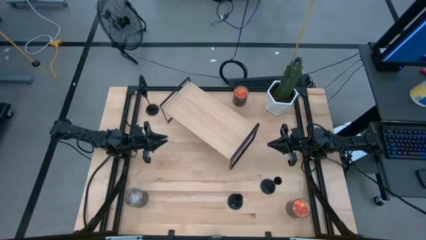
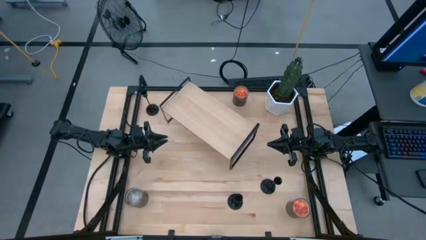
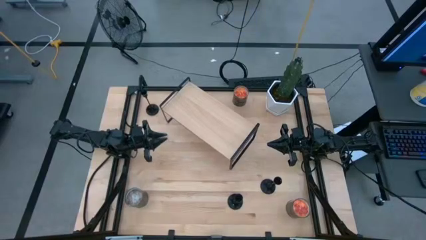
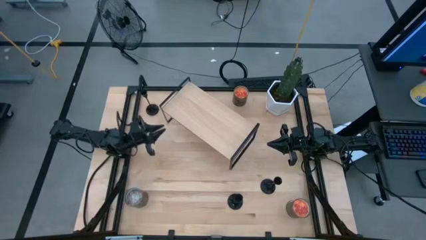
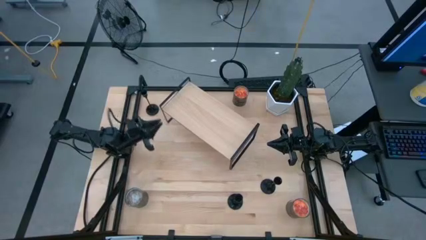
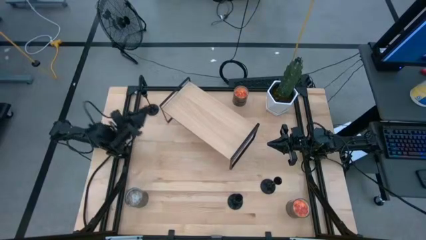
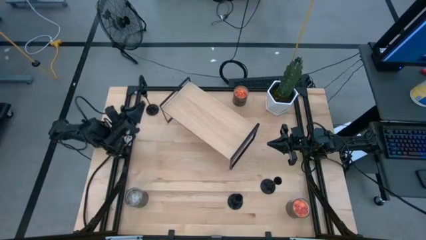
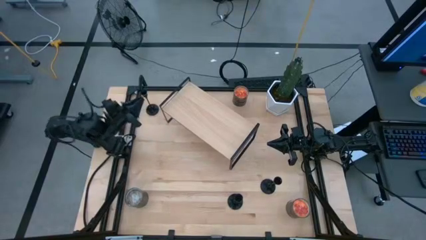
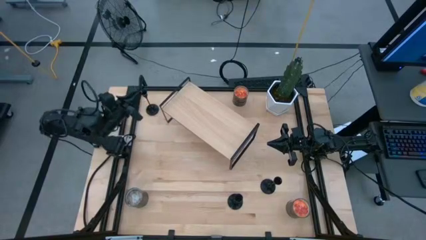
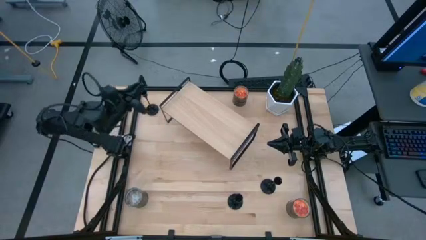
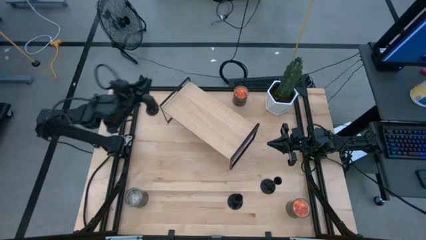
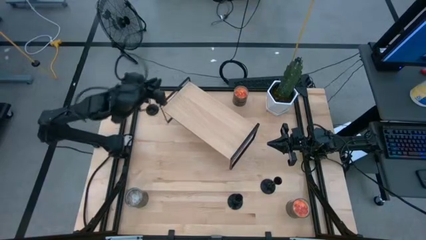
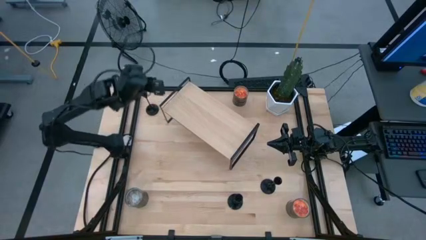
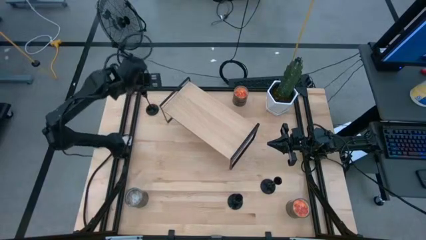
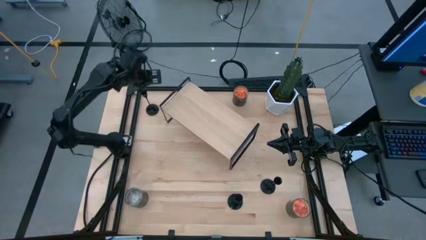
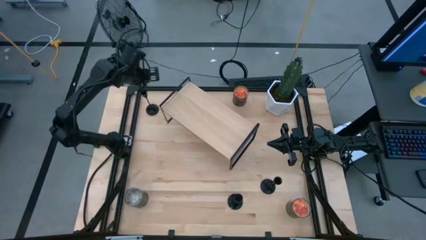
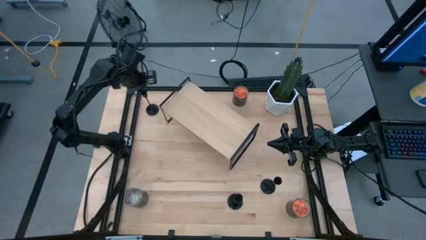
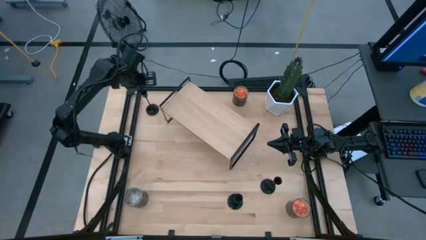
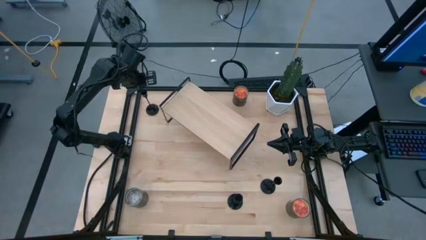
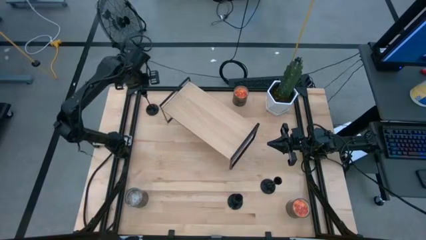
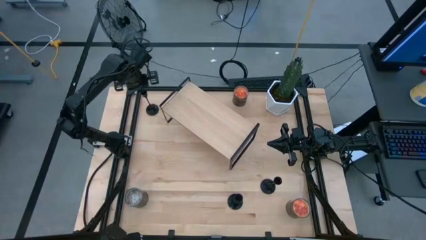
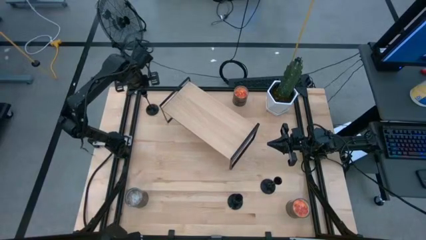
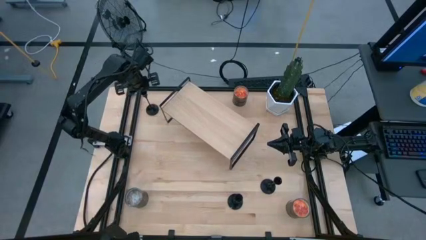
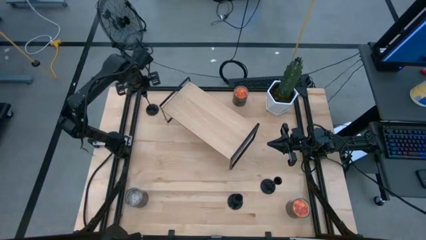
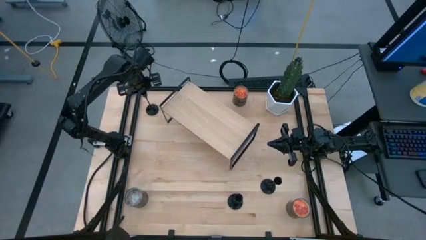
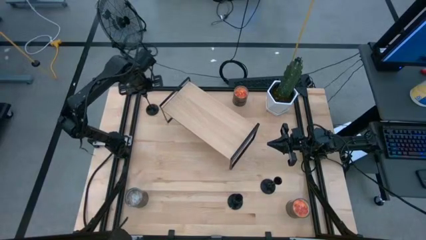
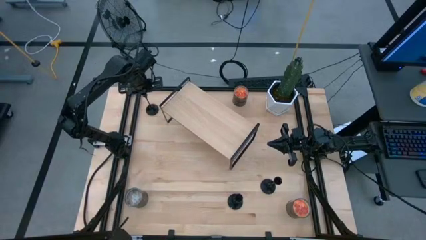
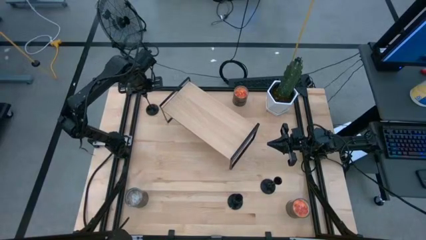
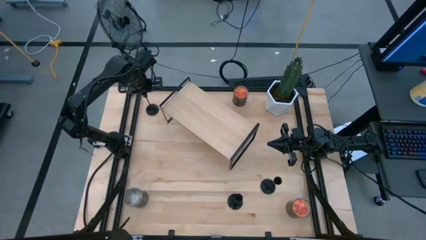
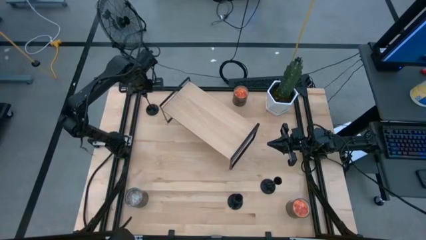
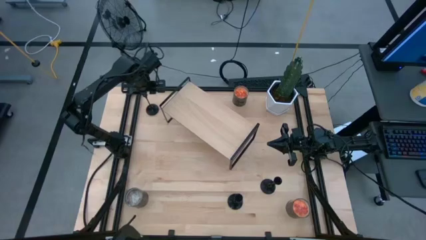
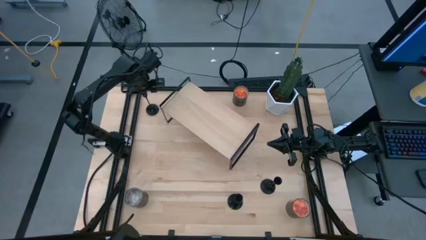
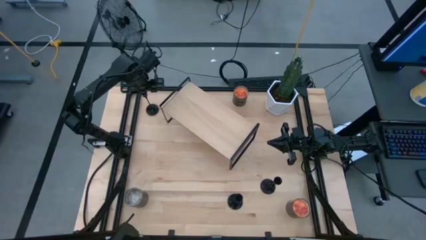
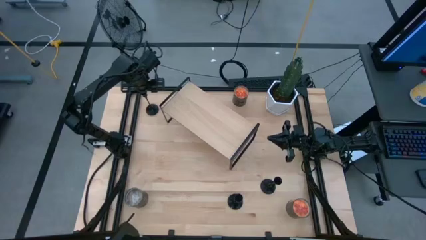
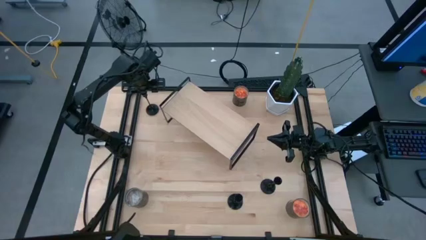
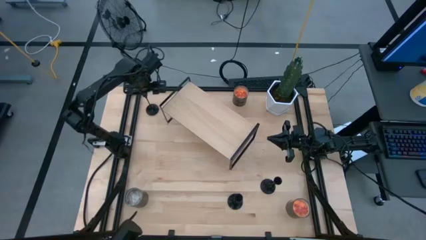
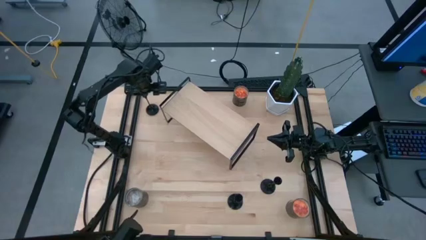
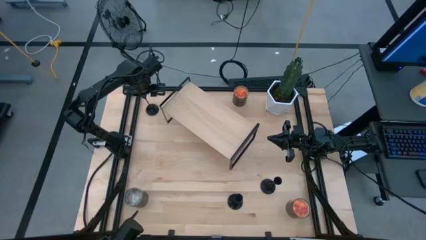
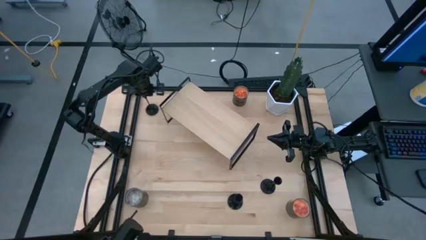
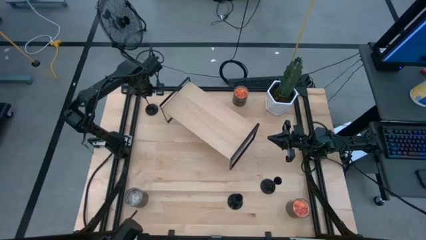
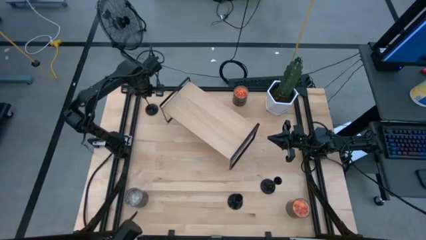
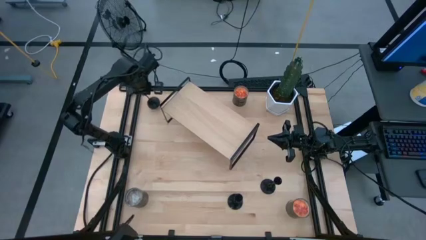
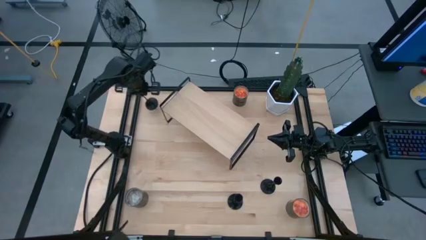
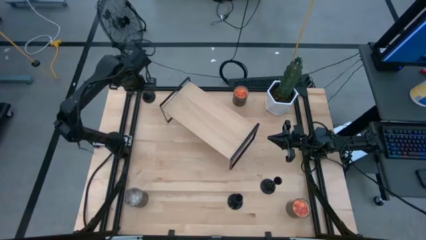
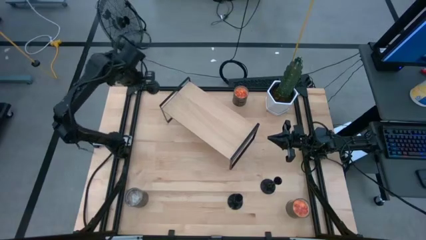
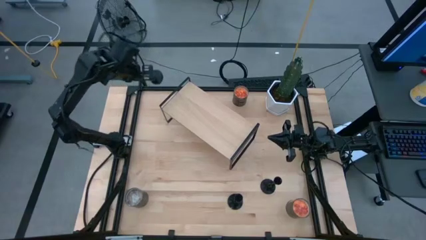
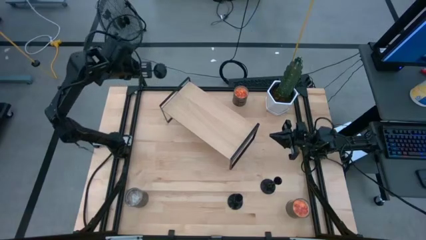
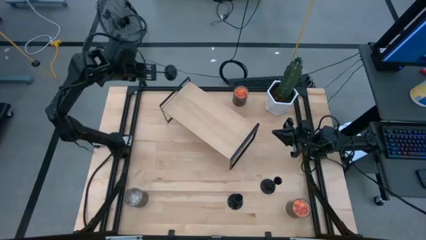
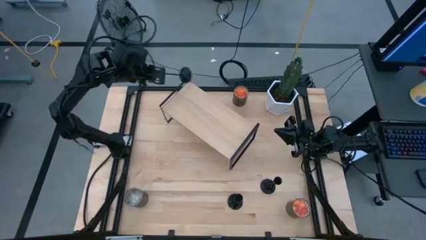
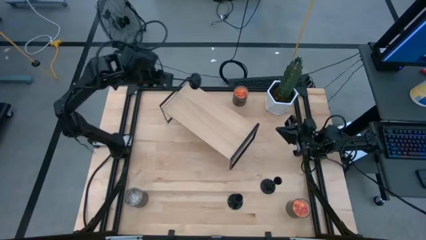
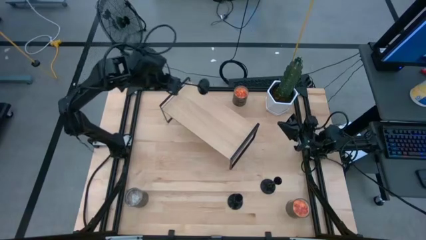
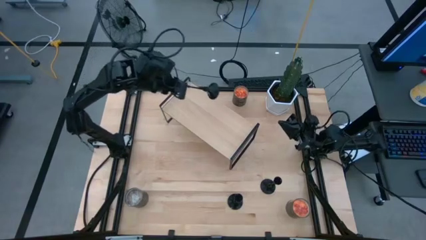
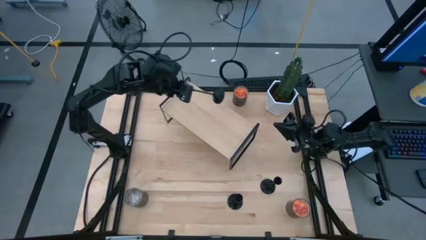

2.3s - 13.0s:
Task: Pick & Place candle stick holders
Put the top black candle holder on the shelf

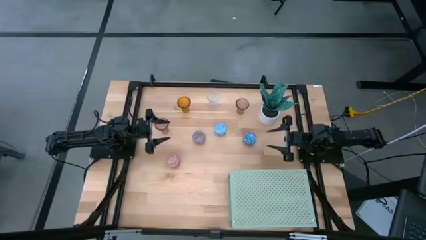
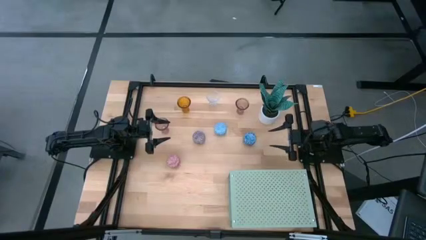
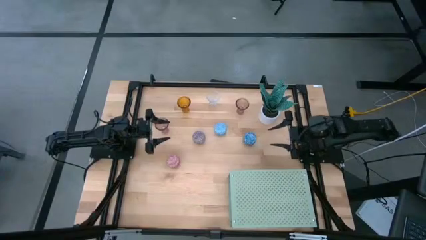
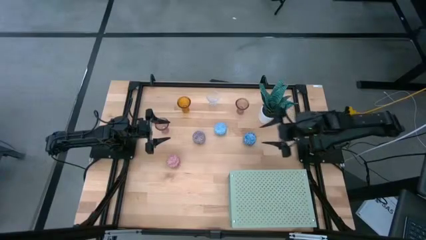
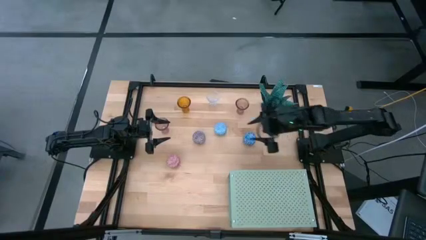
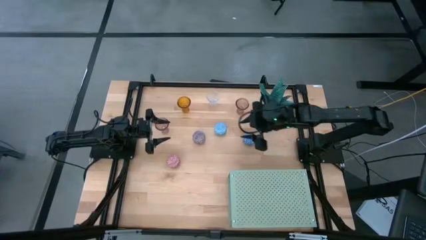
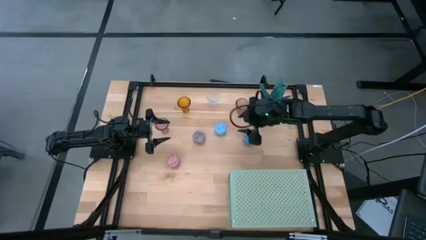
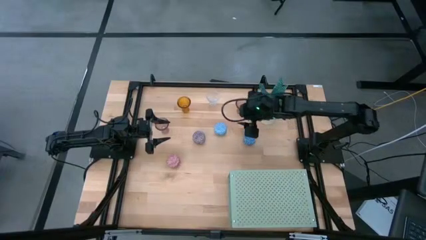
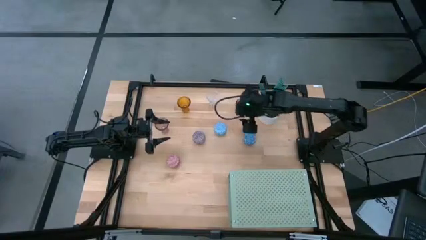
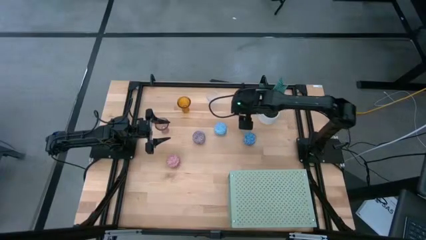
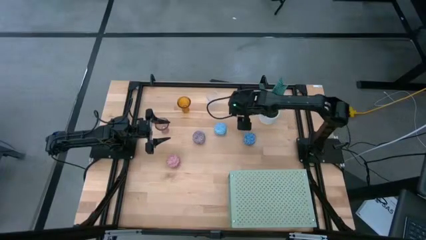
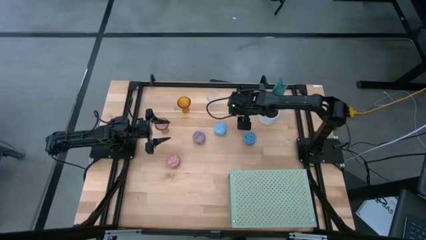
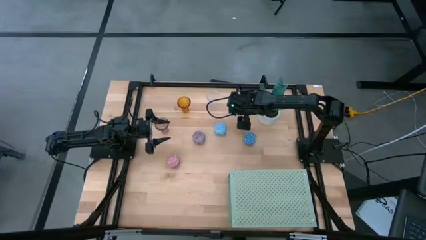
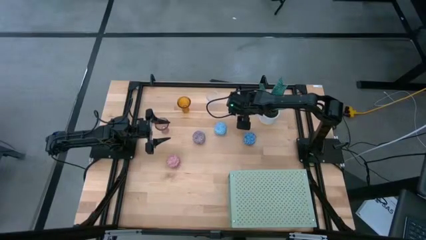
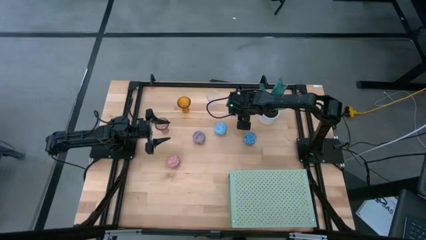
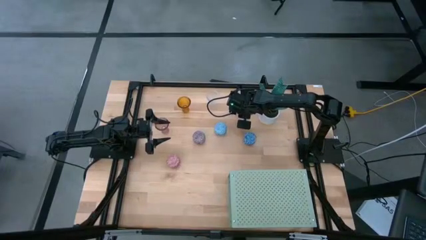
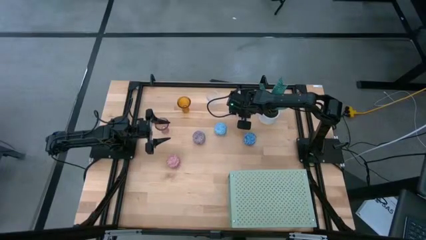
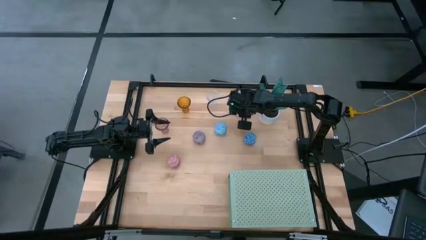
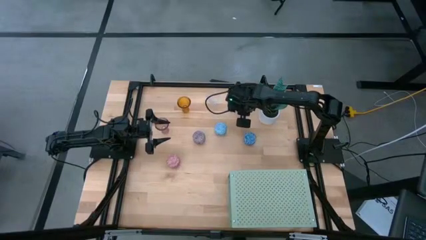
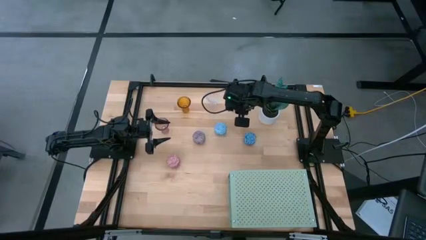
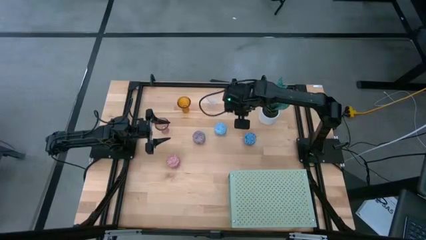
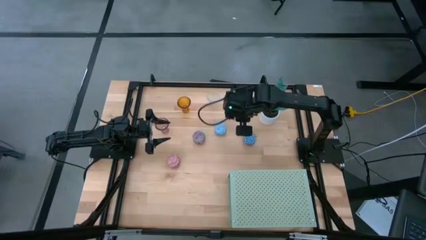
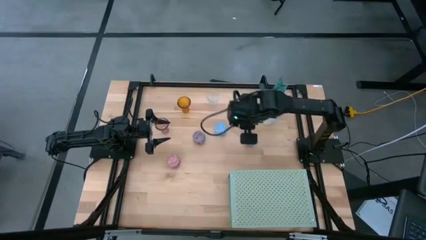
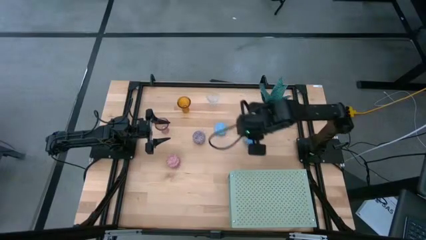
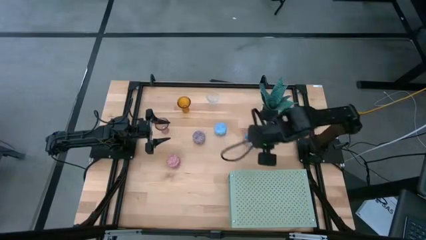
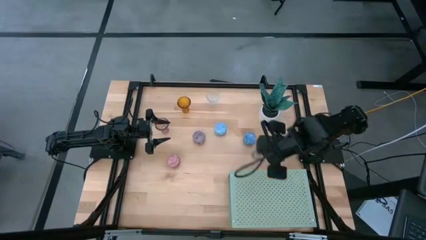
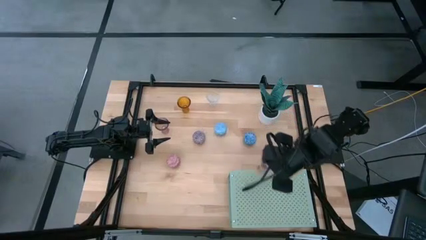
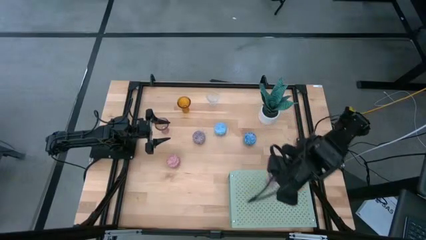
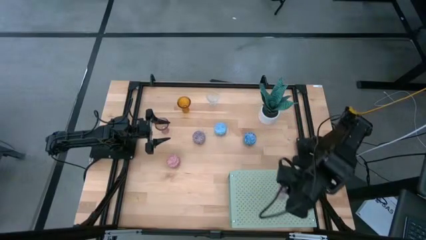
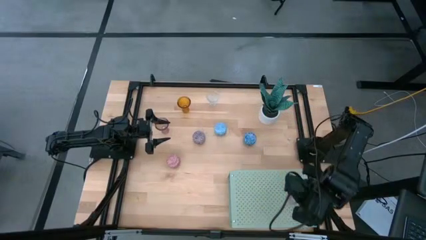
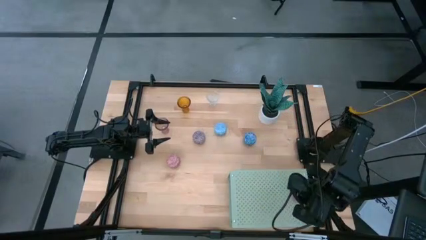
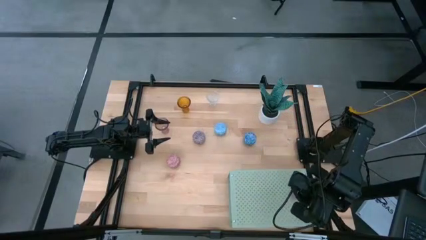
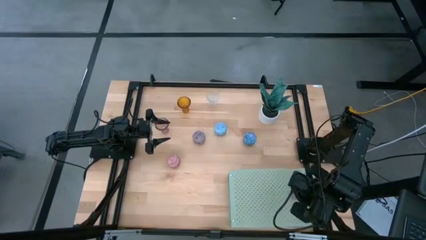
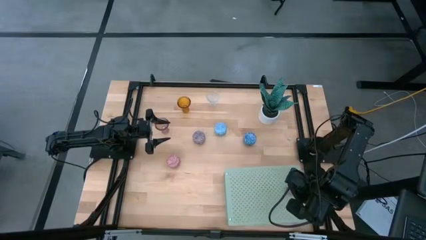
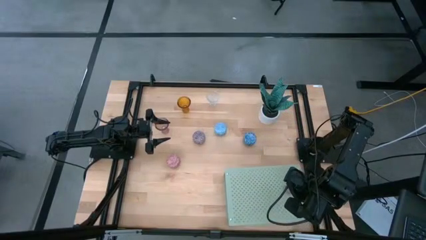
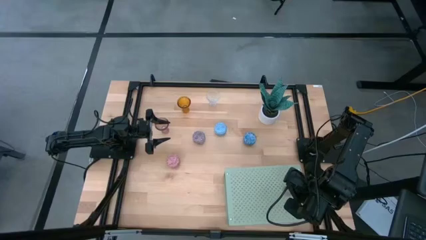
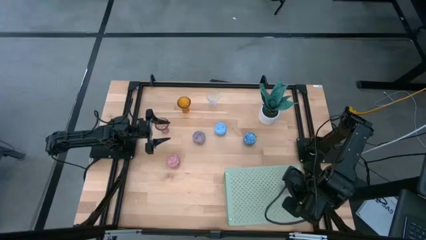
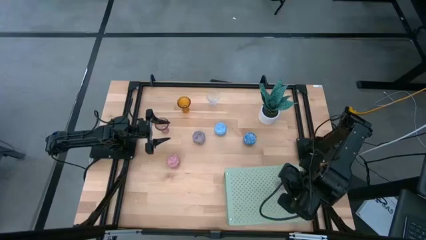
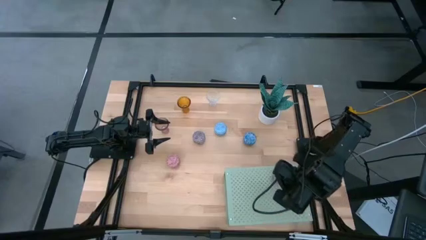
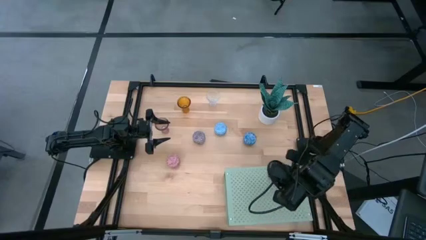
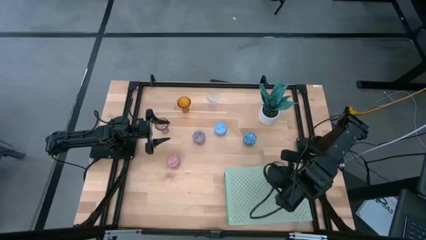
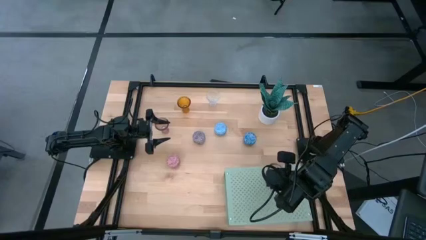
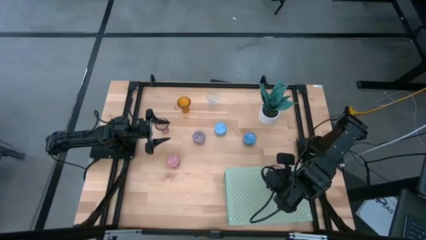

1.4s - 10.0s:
Task: Pick & Place candle stick holders
Put the top pink glass candle holder on the shelf
